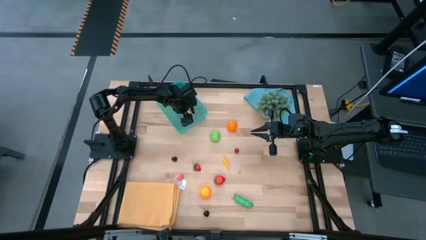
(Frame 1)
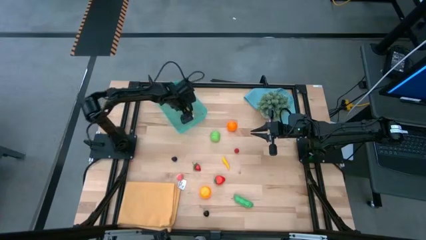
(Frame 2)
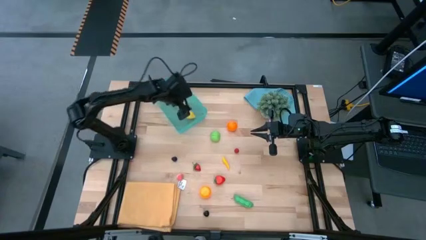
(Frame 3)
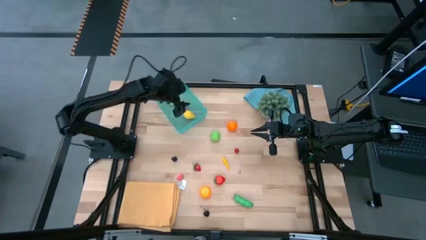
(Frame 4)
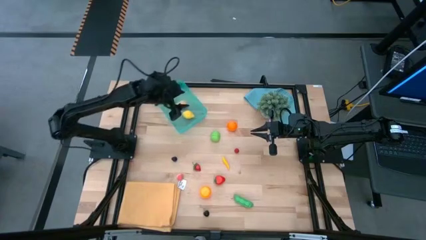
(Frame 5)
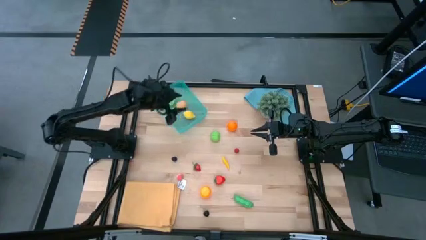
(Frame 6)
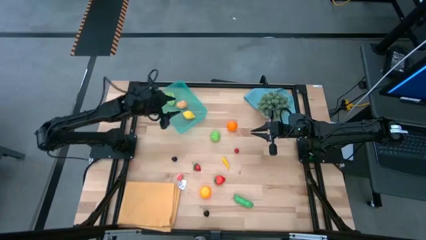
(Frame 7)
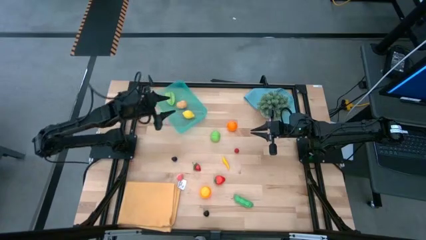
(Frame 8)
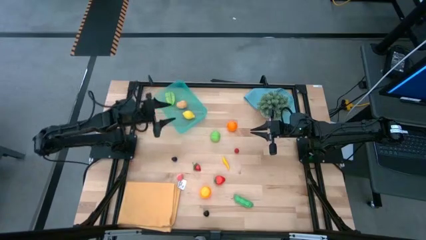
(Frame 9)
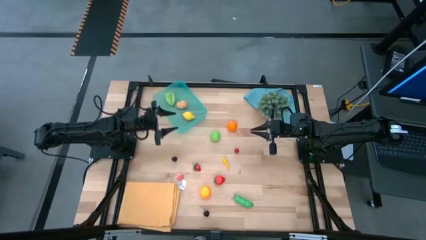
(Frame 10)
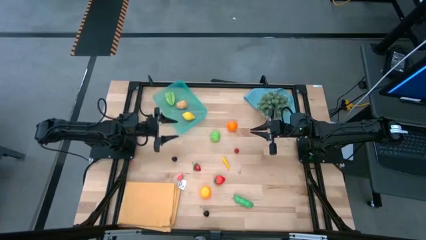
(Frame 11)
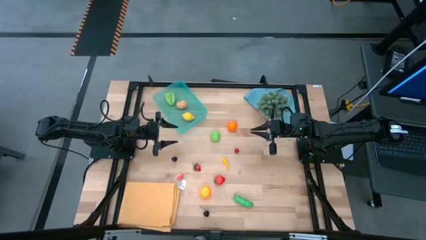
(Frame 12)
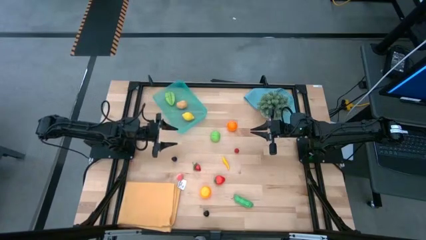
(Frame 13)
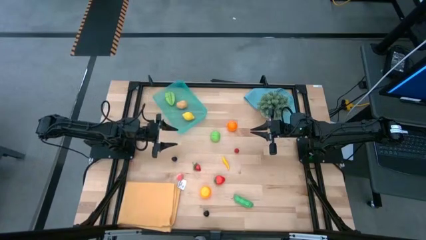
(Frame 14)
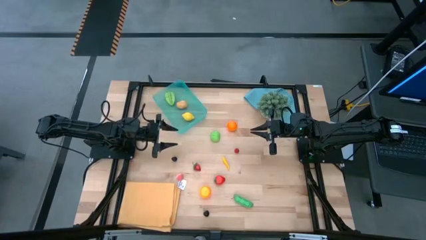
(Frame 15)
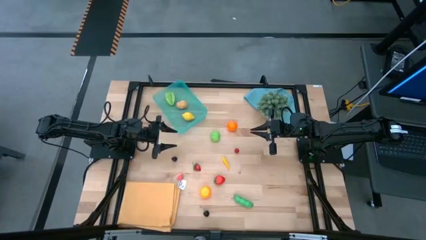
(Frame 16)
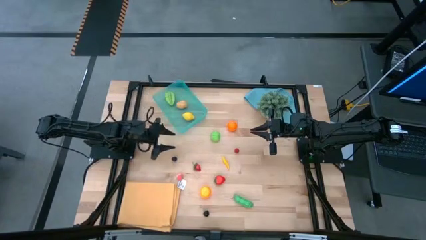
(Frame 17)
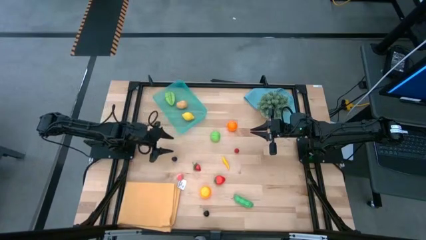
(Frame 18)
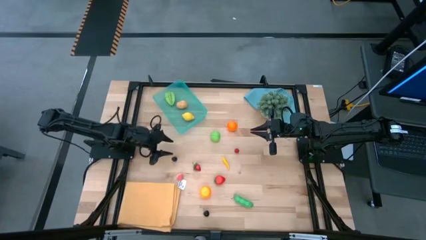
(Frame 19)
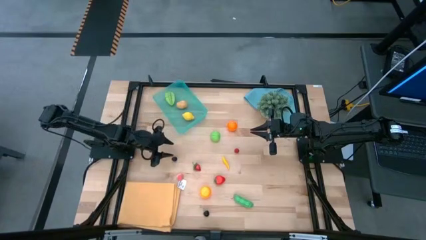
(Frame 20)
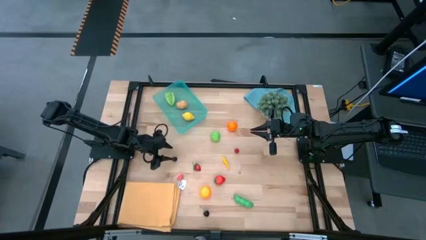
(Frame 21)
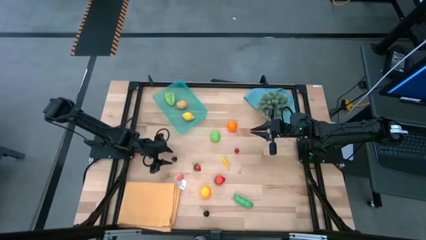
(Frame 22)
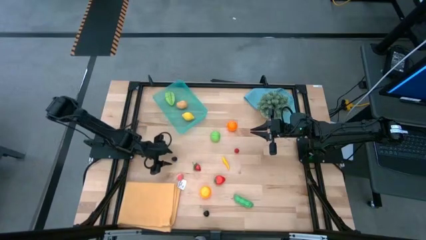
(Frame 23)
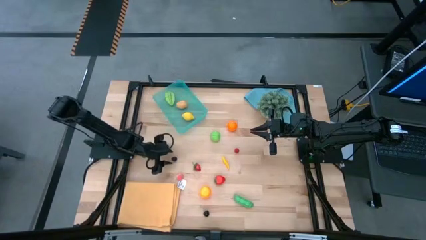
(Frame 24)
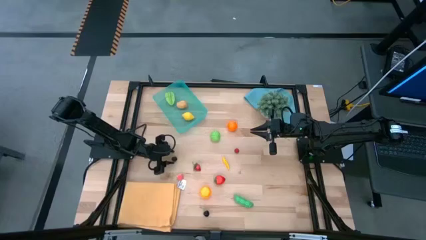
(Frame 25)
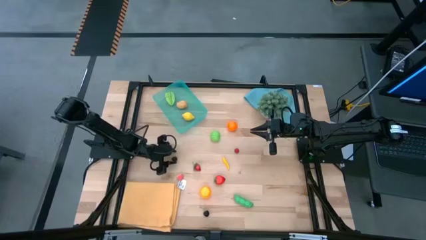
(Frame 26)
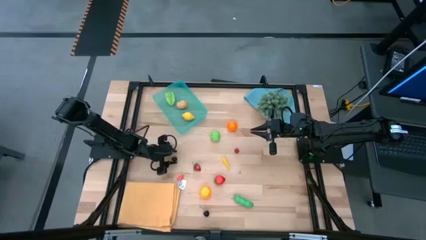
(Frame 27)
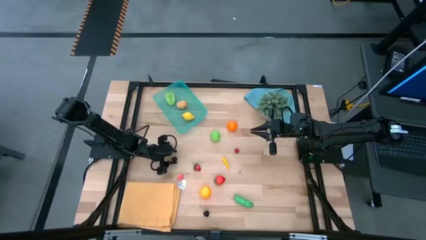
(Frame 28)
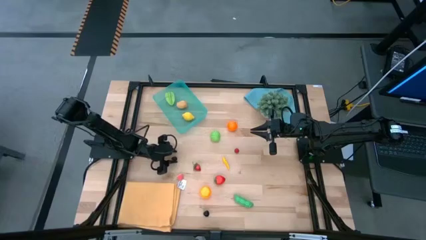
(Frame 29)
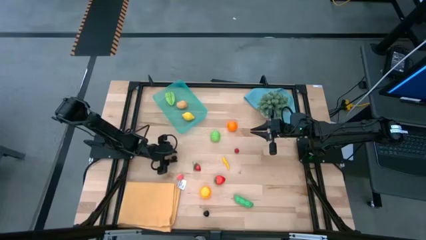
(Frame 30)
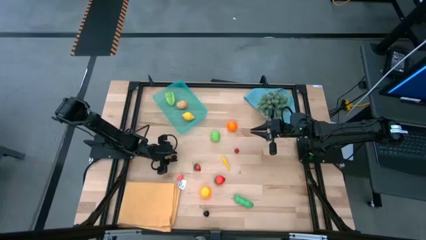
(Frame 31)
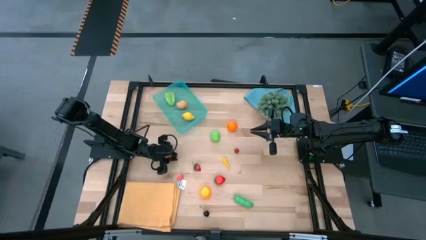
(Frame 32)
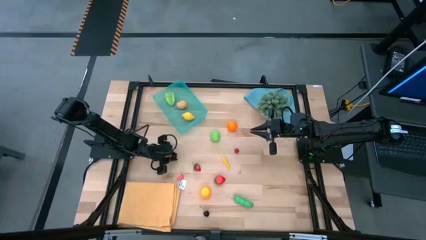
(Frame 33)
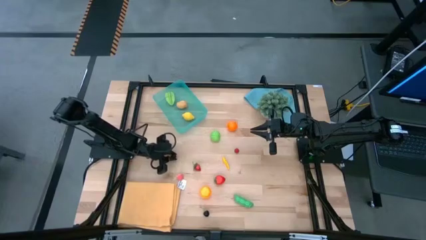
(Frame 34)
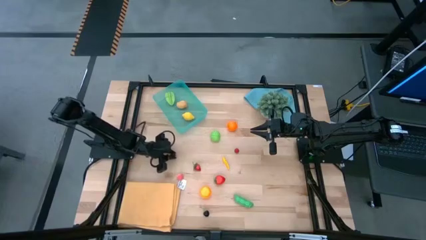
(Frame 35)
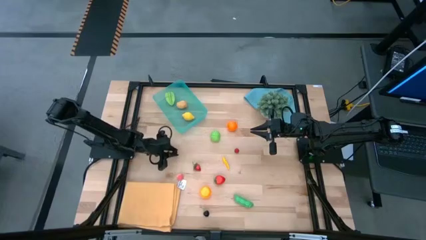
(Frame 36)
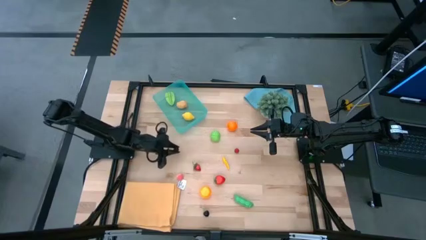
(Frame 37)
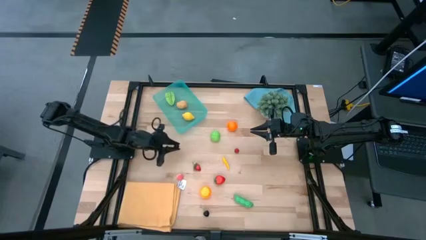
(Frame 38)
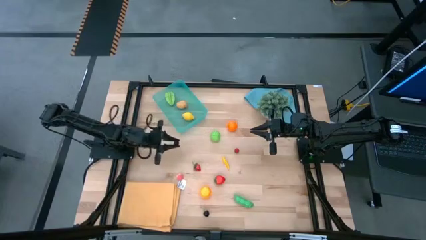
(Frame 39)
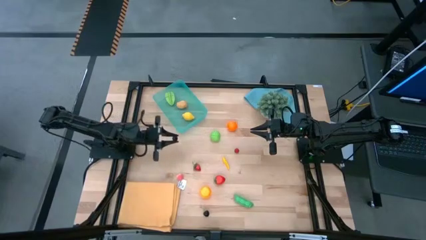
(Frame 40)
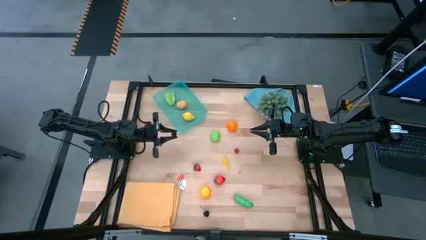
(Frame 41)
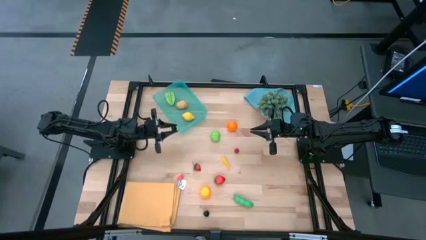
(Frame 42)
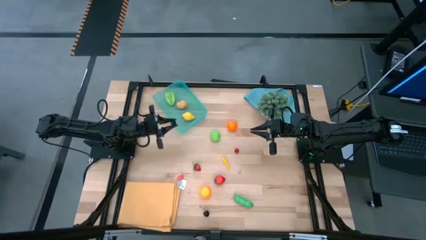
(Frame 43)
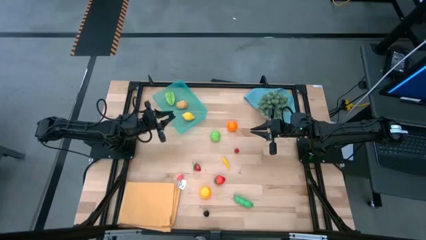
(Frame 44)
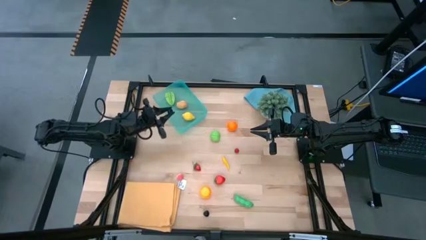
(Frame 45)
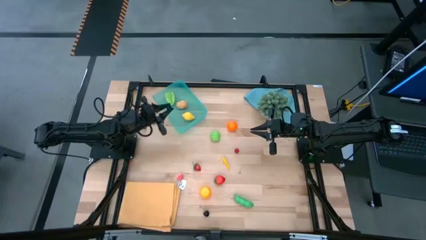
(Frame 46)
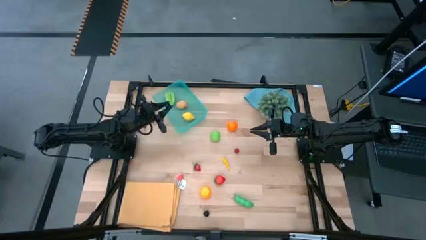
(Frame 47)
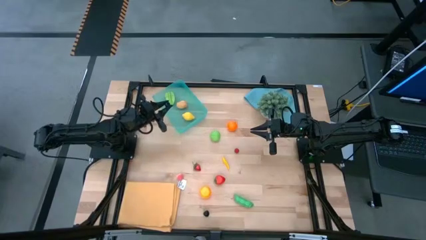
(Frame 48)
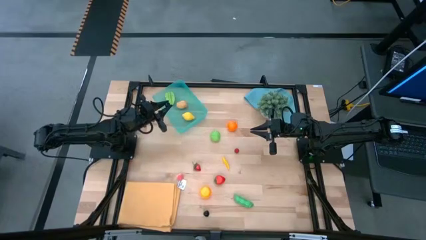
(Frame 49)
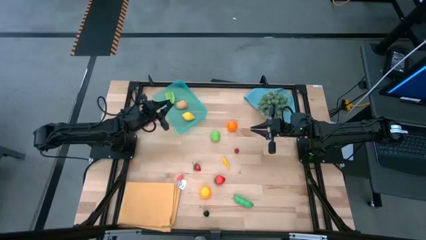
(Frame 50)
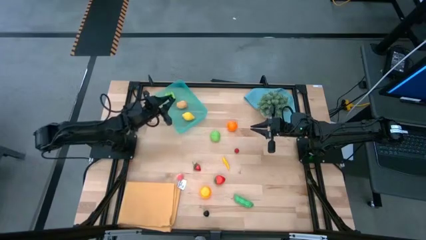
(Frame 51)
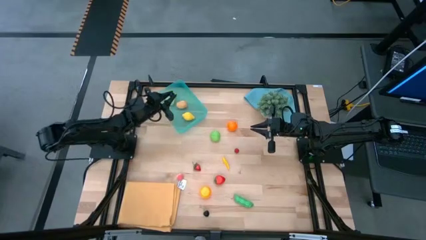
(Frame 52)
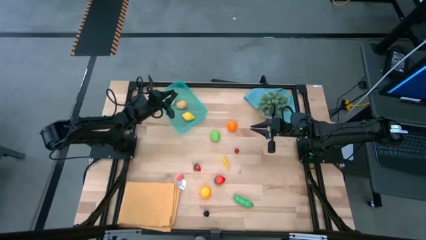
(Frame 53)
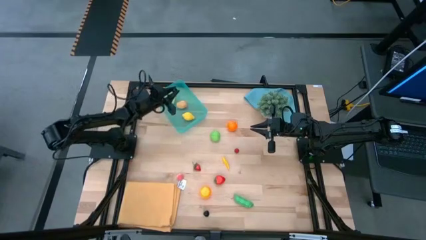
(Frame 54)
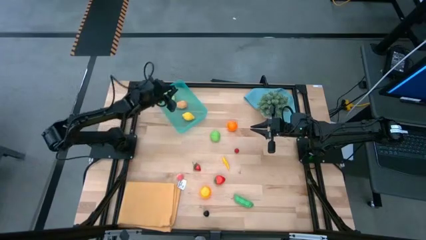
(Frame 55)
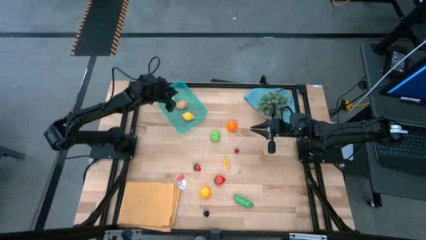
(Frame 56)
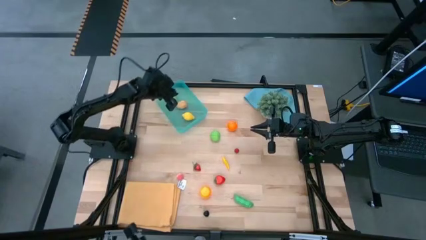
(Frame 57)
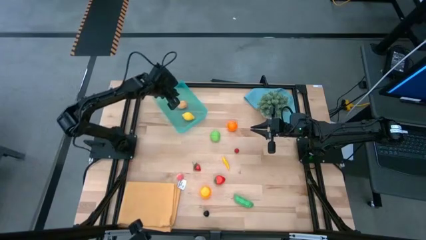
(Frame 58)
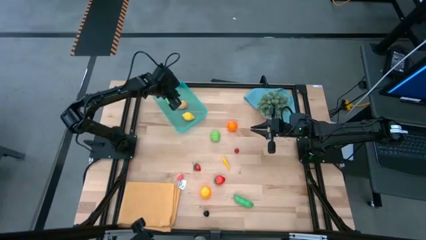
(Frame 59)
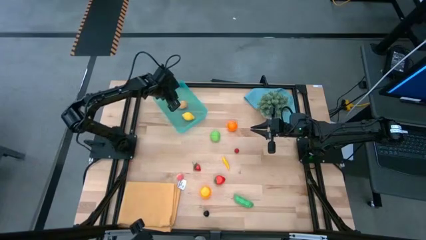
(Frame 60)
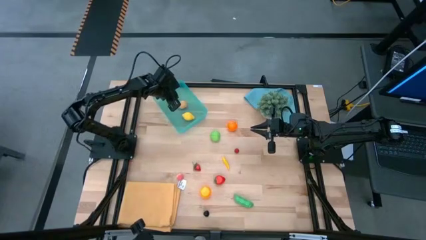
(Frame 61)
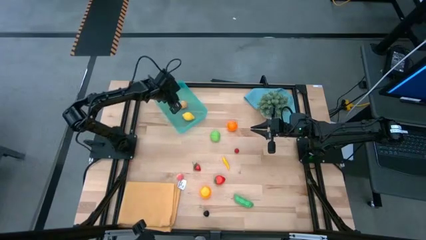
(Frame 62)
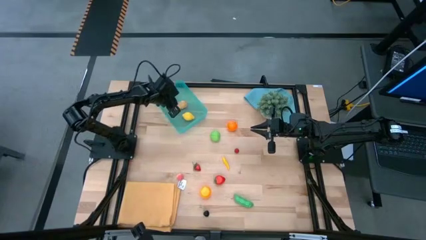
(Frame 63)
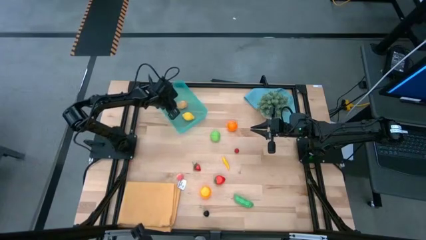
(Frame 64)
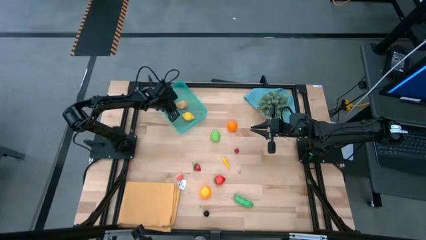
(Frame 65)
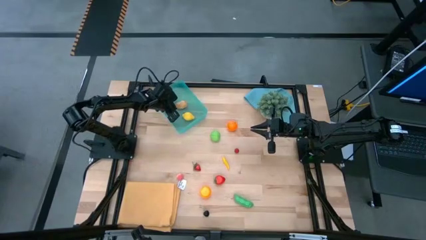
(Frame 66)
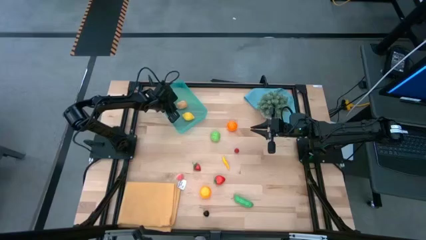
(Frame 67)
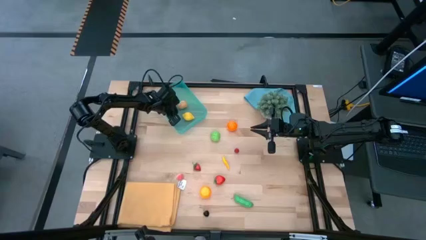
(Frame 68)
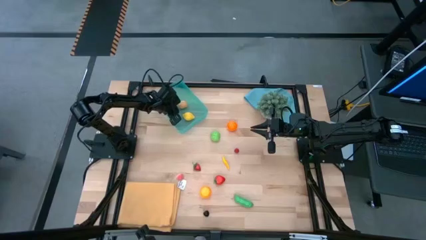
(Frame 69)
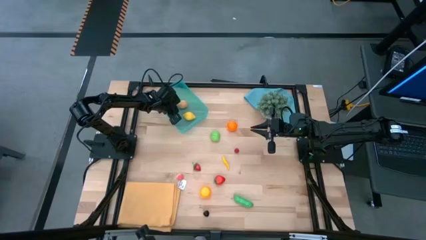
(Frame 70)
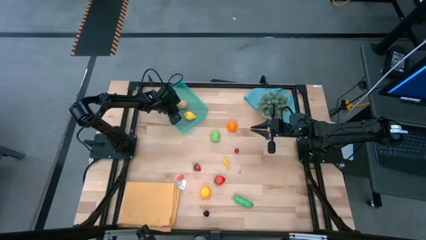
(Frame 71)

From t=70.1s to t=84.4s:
Task: Pick and placing Produce into tupperware
Put the black berry into the blue bin

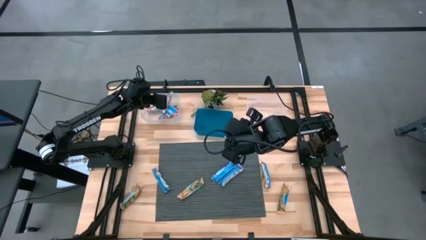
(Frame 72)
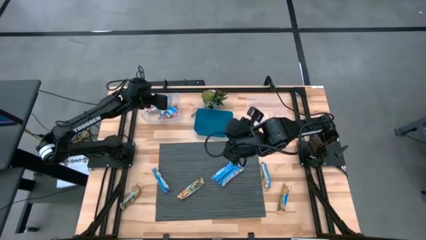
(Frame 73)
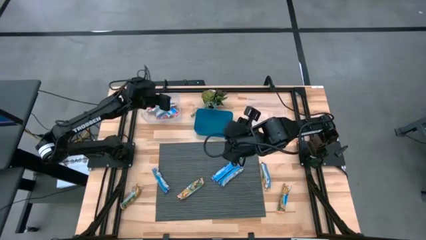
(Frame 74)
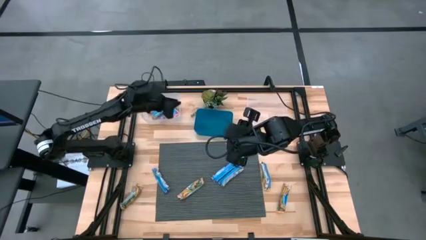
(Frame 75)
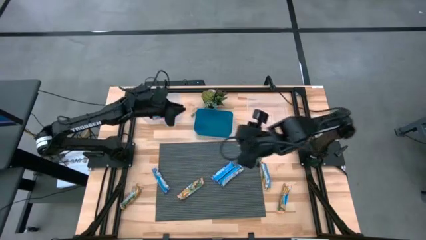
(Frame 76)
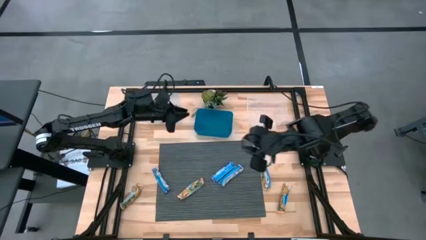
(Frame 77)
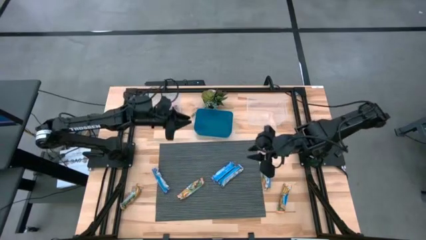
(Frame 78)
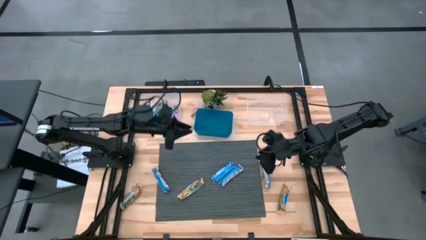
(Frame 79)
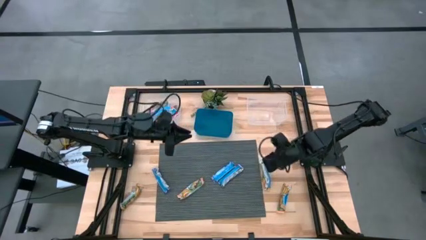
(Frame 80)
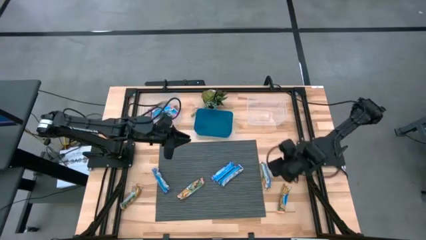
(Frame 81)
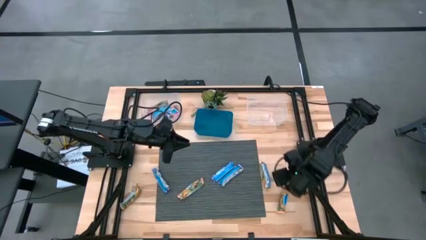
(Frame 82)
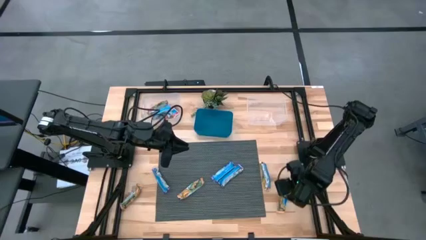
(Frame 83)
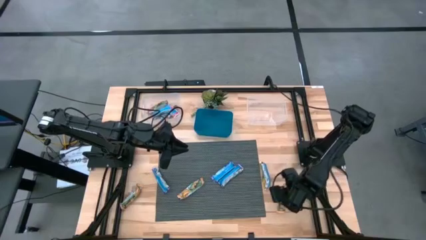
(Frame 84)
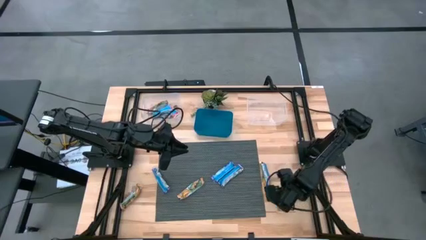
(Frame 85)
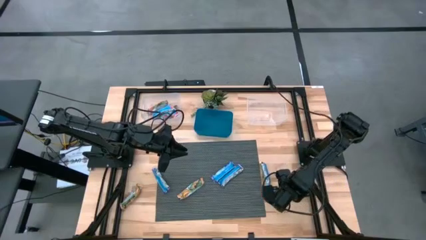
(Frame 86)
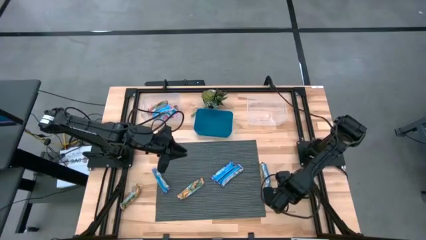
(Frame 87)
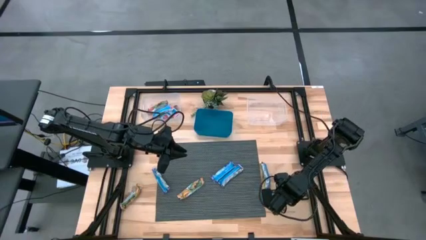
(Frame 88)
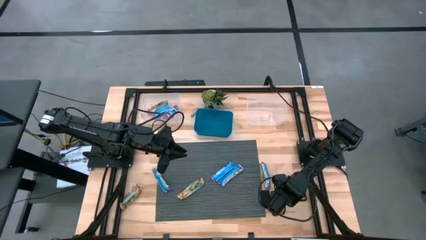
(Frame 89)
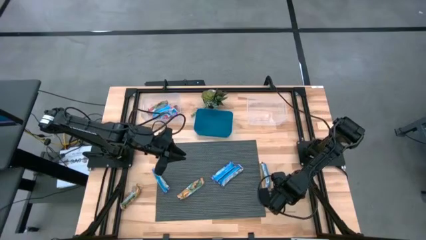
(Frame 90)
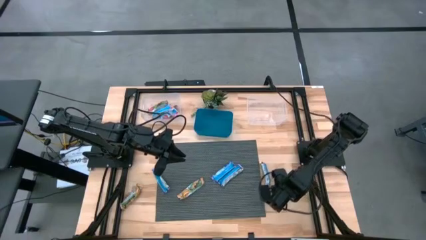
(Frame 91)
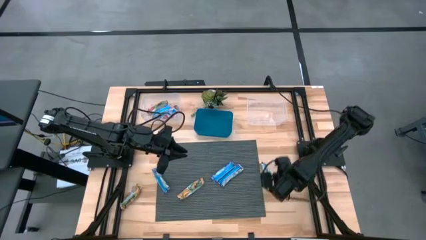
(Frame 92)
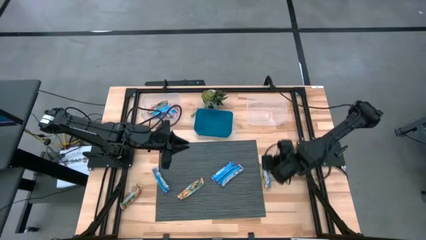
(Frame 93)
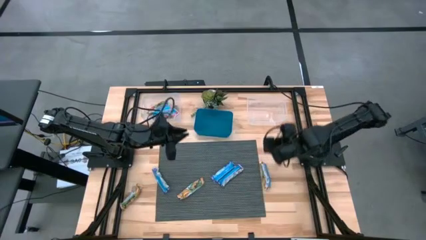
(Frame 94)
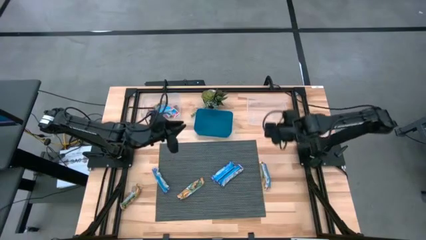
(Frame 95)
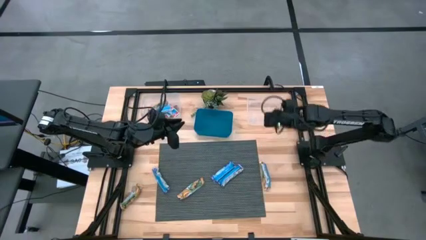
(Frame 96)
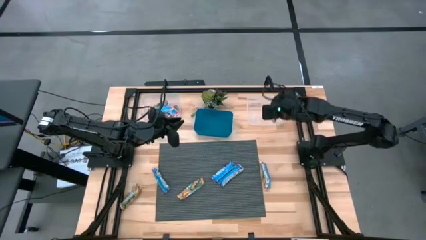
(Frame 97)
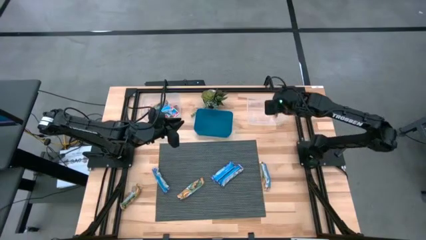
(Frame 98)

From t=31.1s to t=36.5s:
Task: Pick and place Granola Bars by type
Put the yellow granola bar into the right transparent bin
